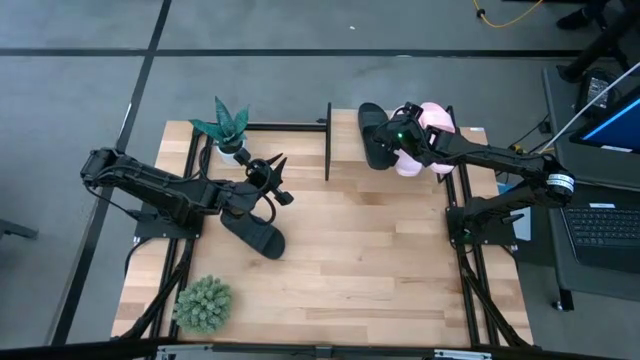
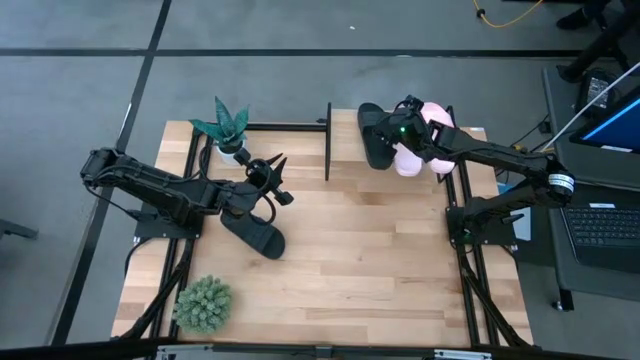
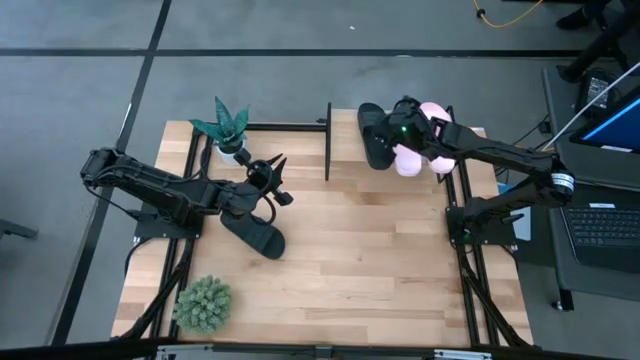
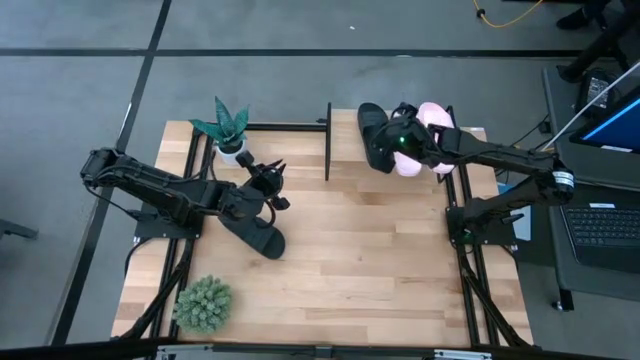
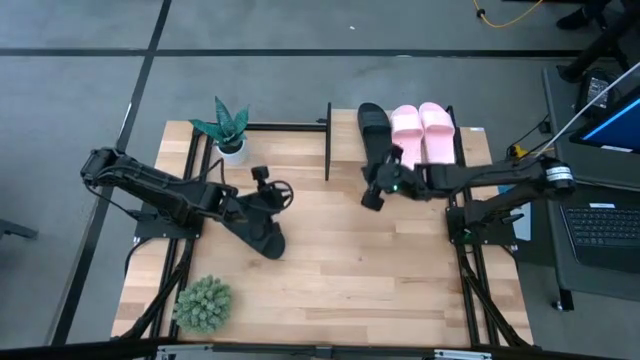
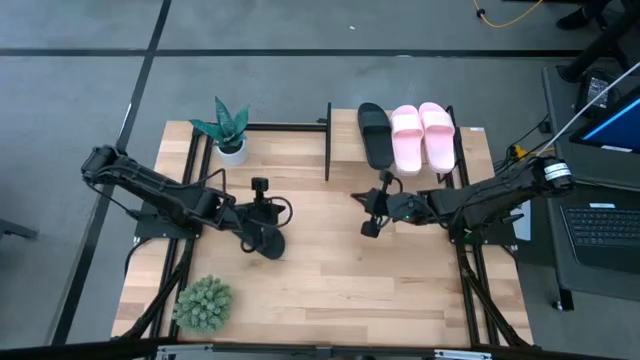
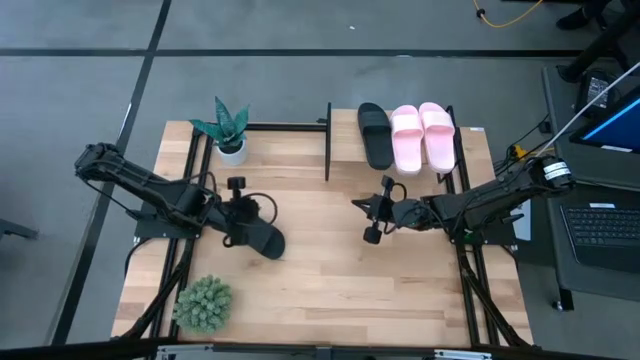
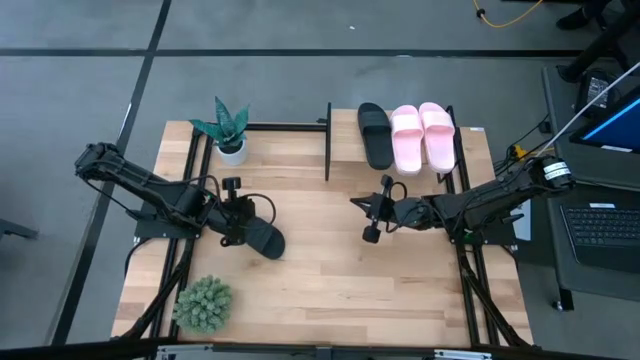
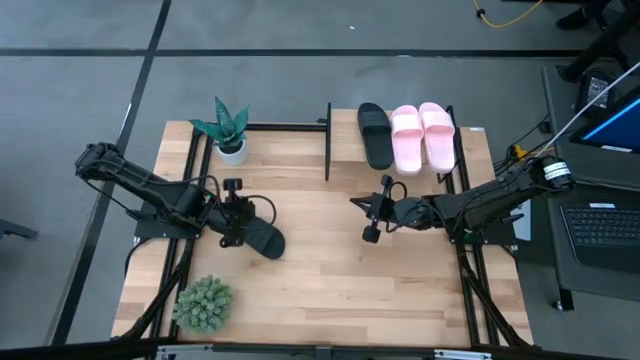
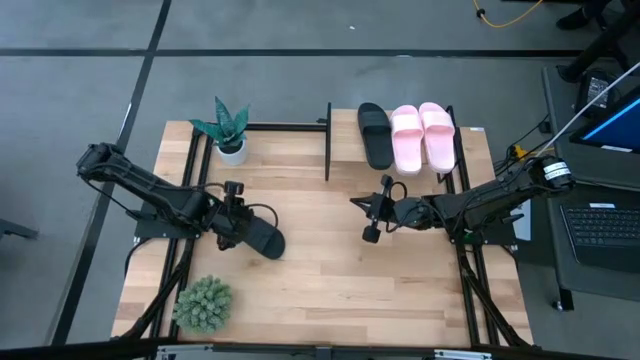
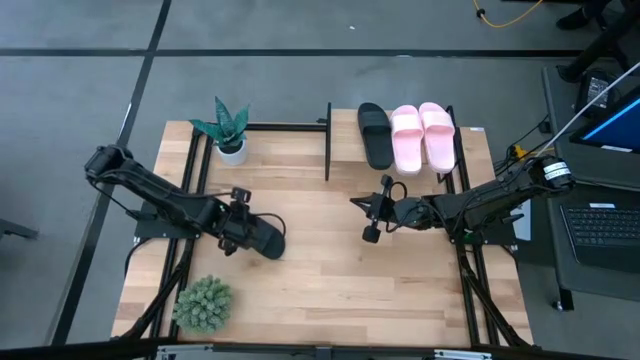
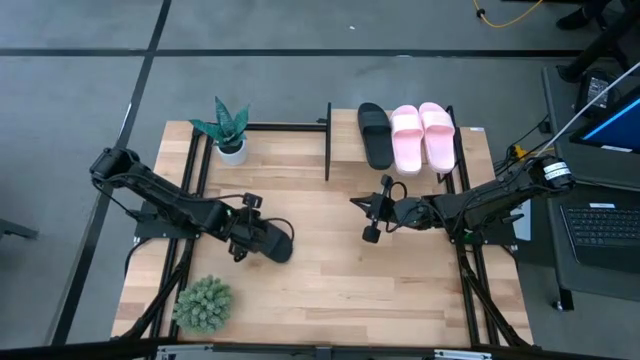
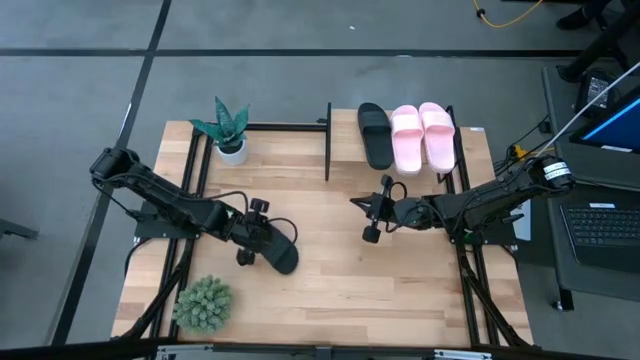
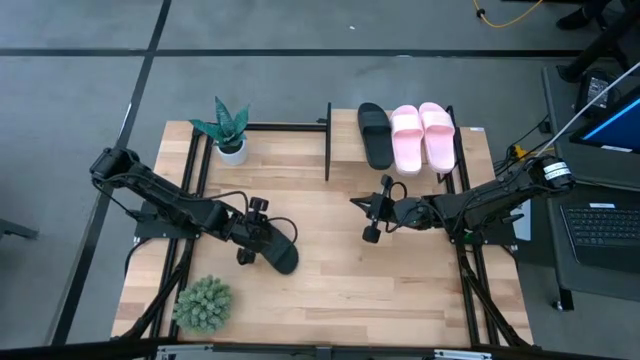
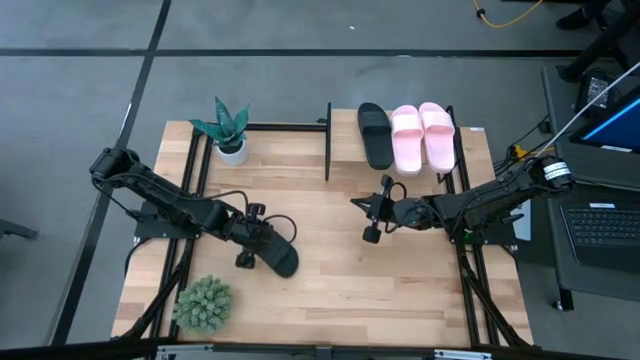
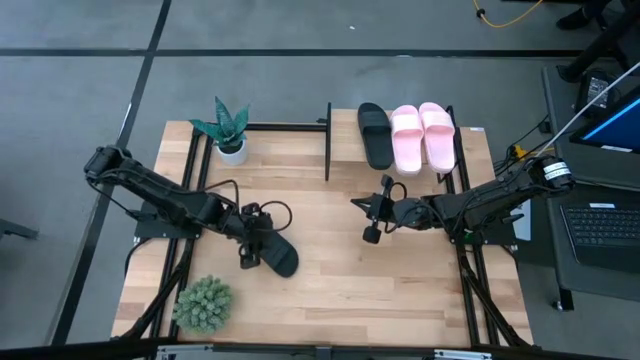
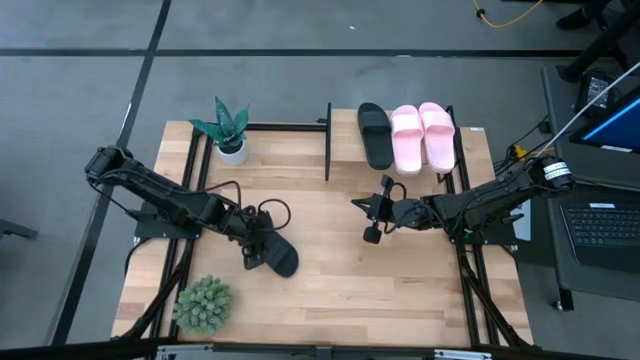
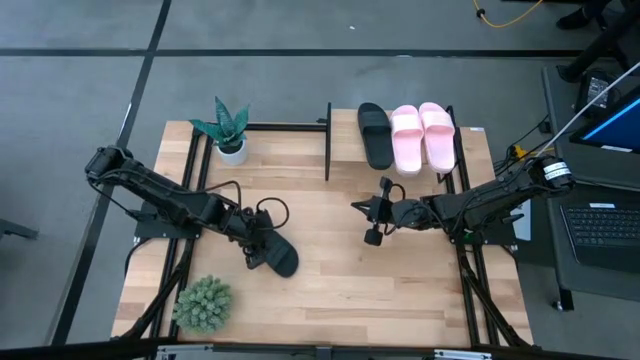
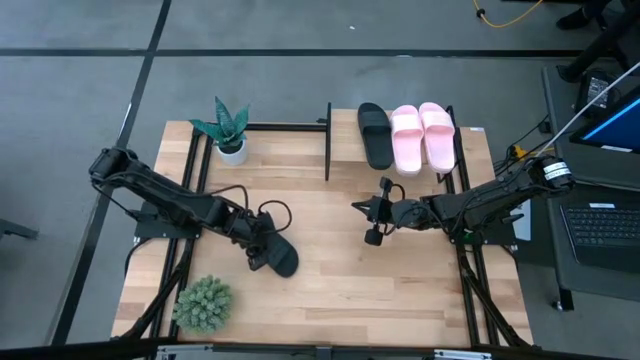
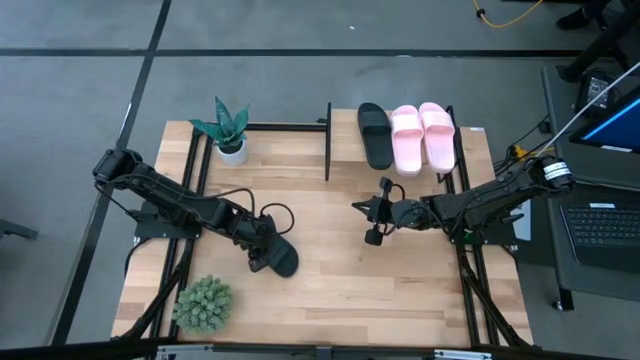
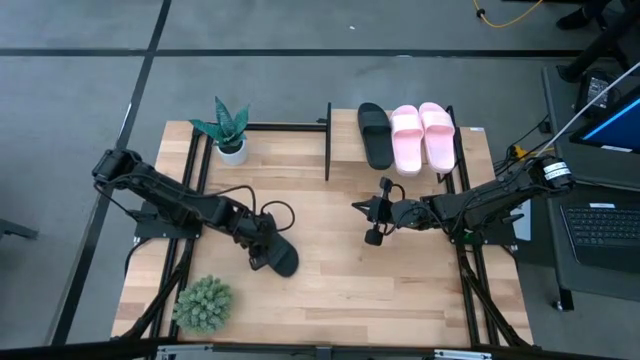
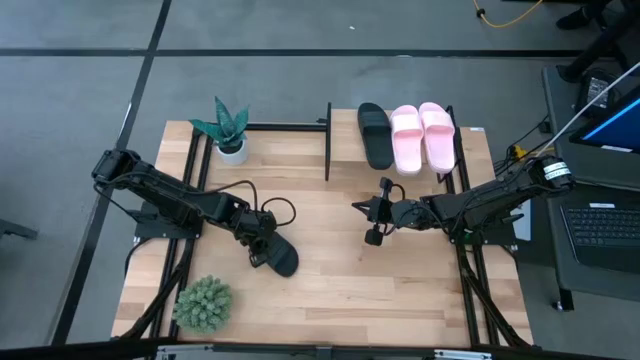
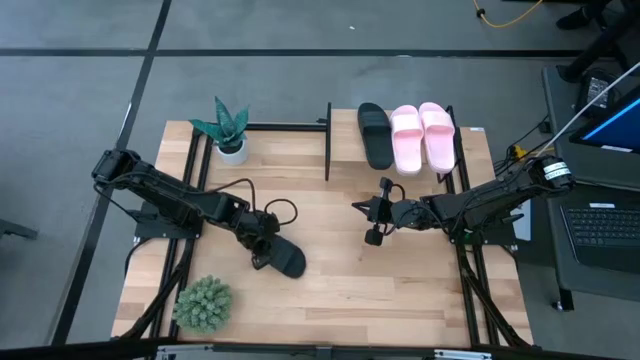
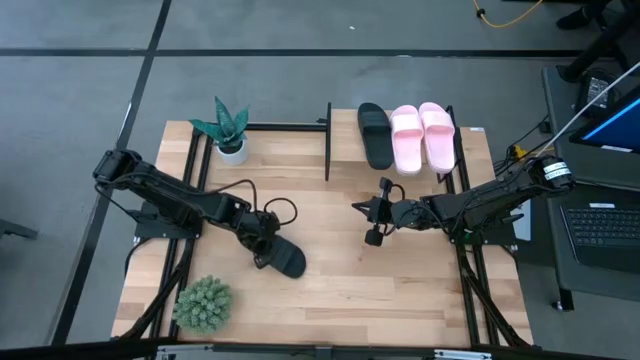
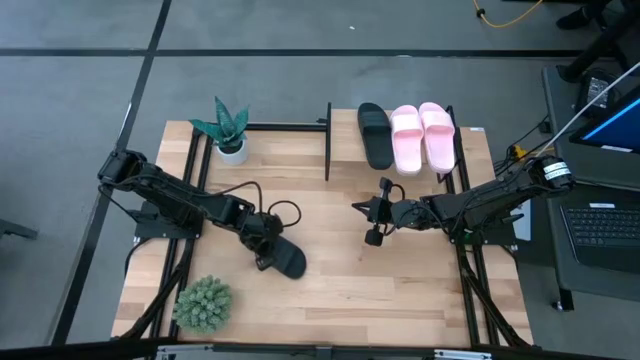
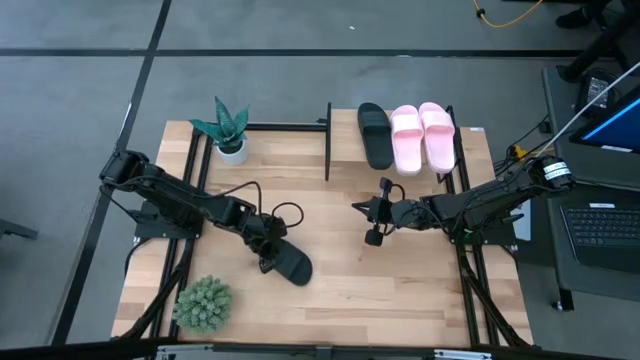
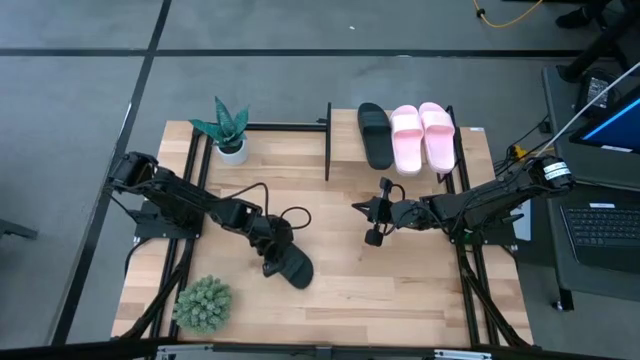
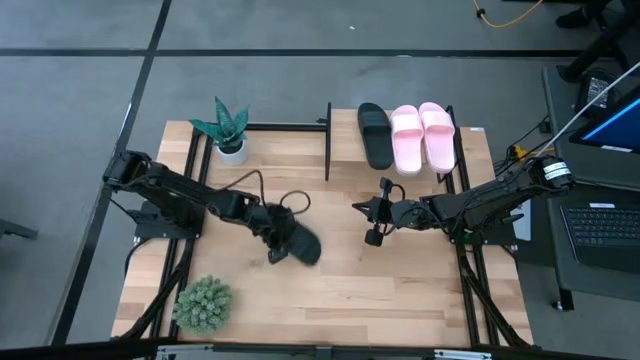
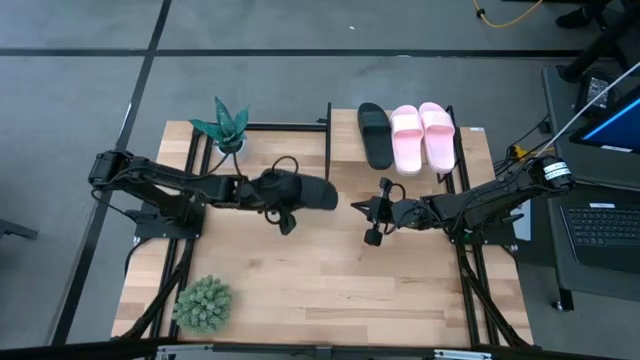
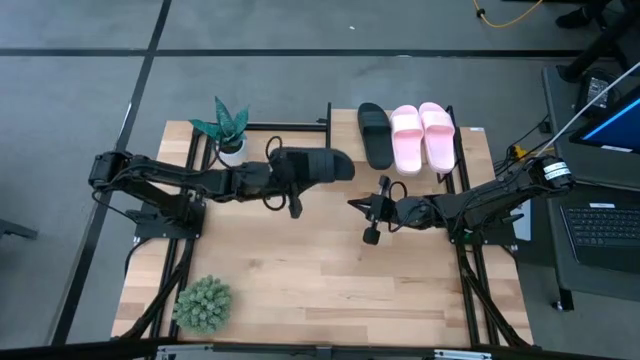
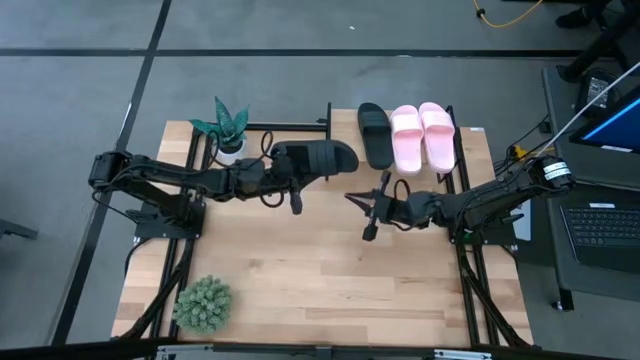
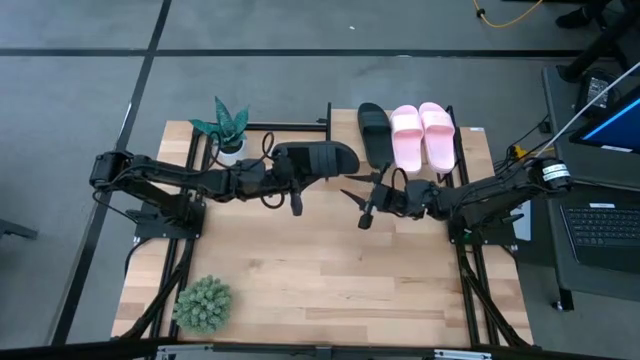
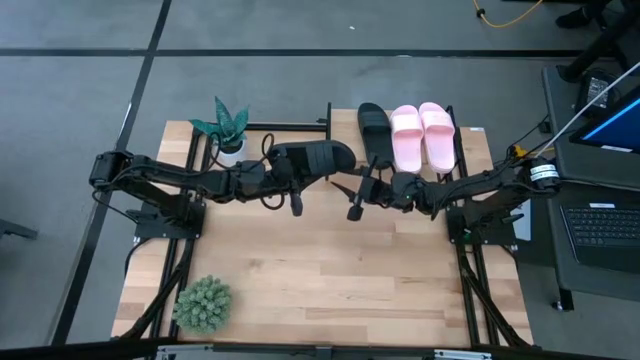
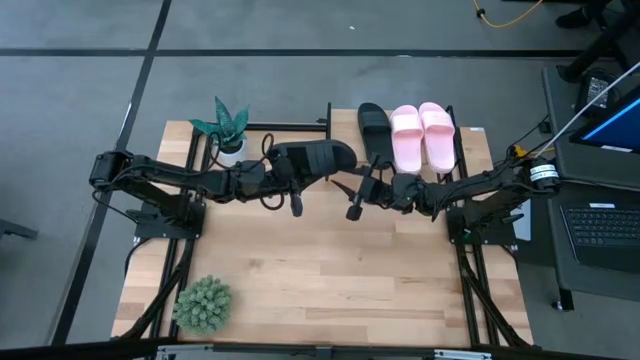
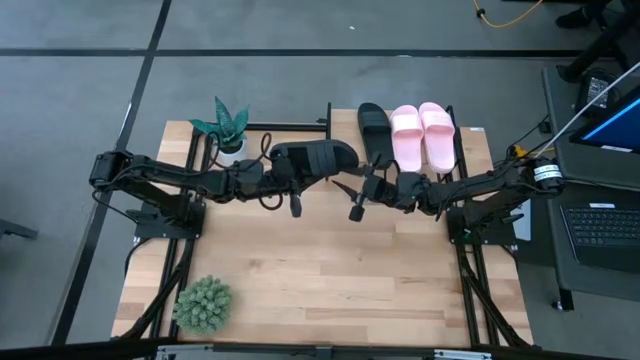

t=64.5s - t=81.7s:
Task: Pick and place slides into the shelf
Put the black slide on the shelf

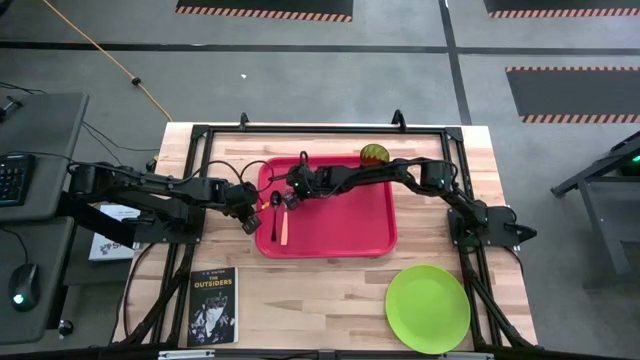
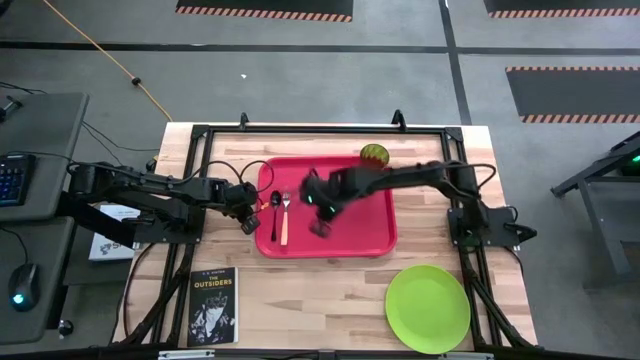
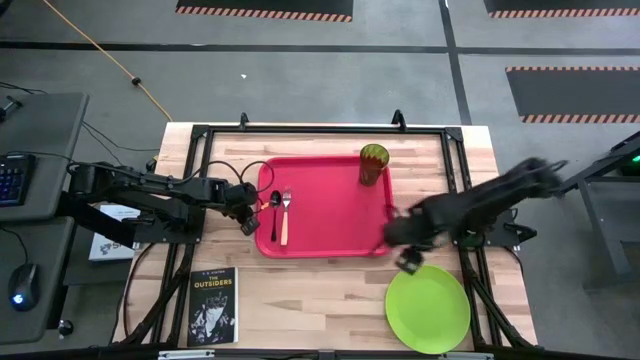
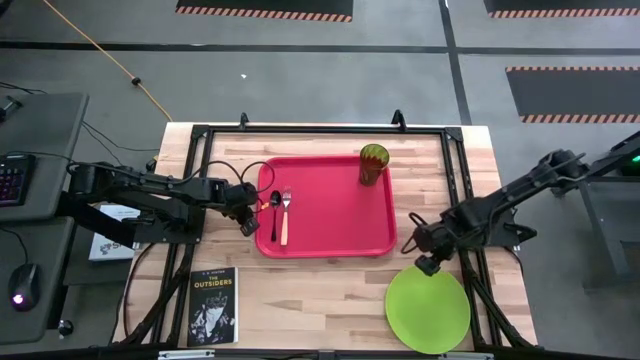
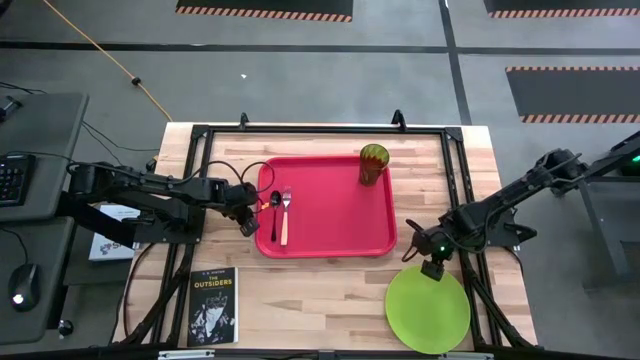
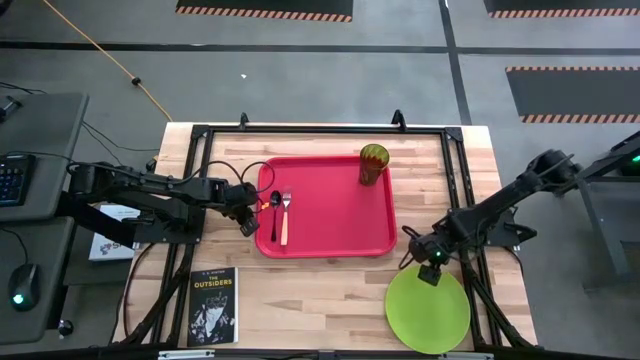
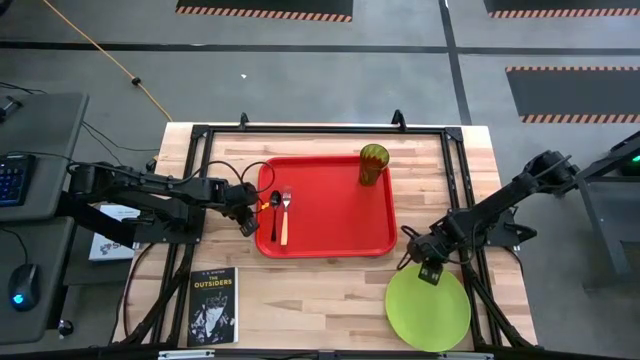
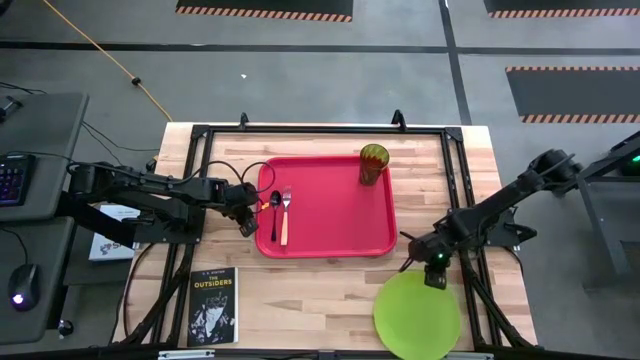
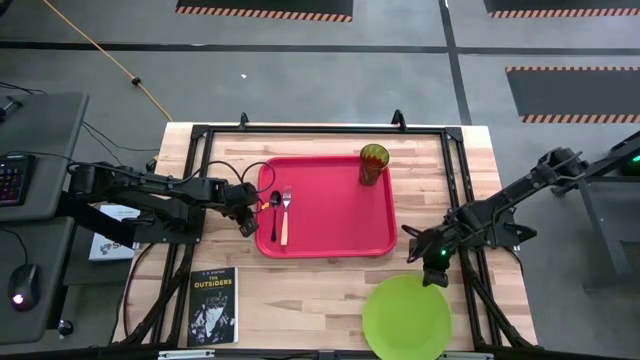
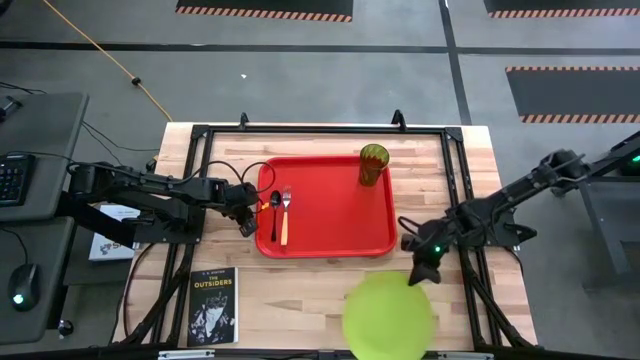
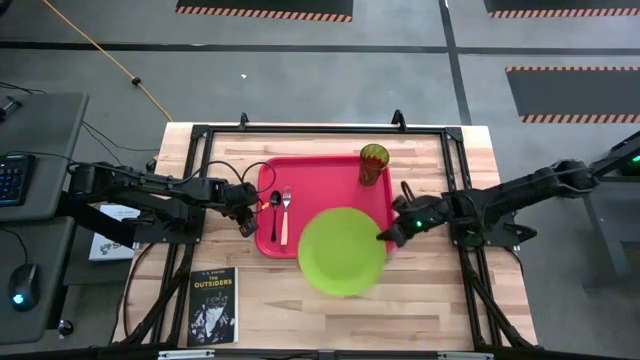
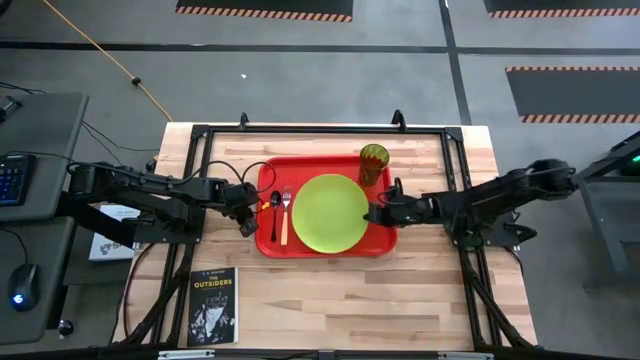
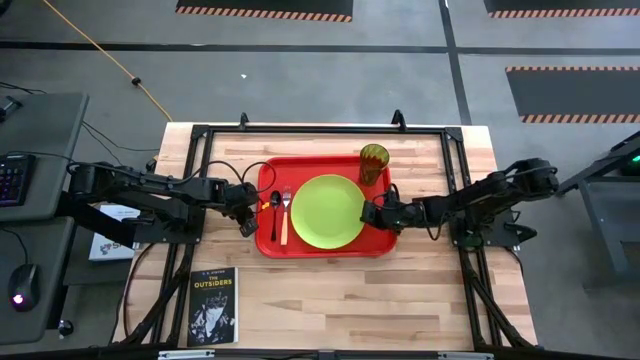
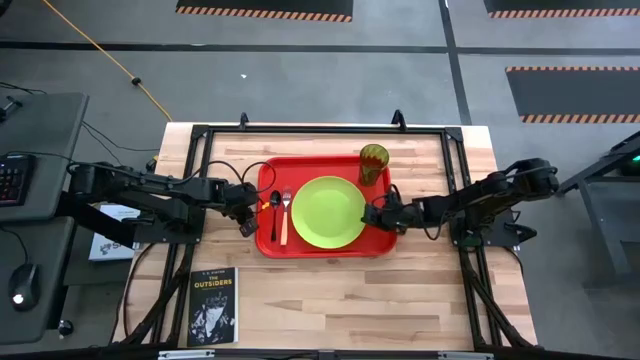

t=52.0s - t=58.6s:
Task: Pick and place plate/cup/fork/spoon on tray
Put the green plate to the middle of the red tray
